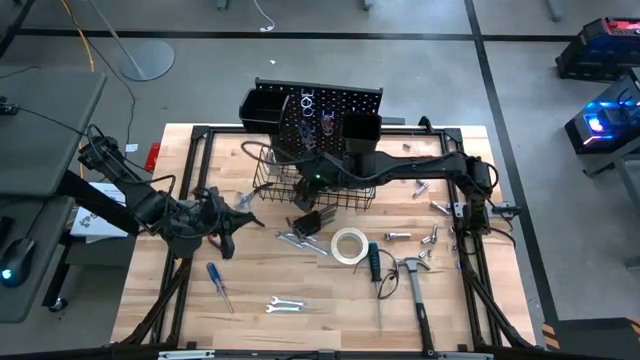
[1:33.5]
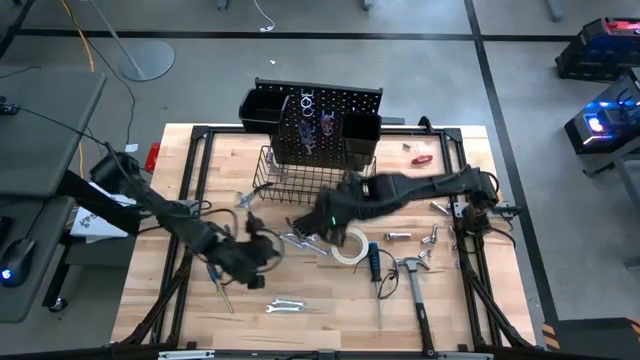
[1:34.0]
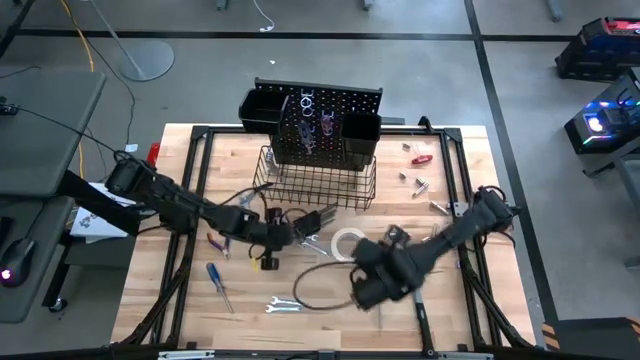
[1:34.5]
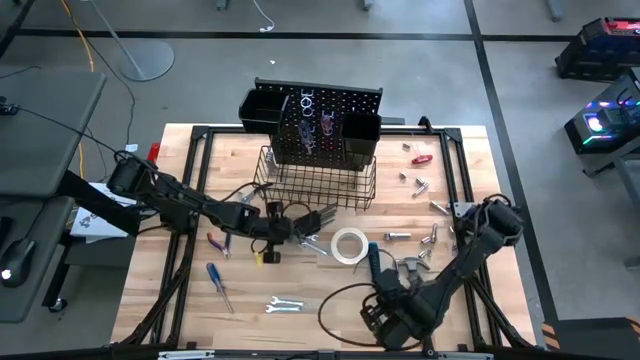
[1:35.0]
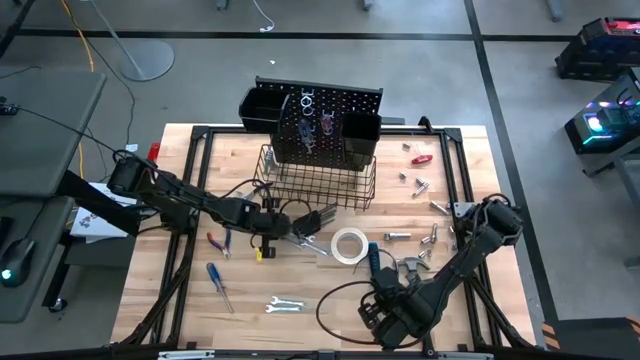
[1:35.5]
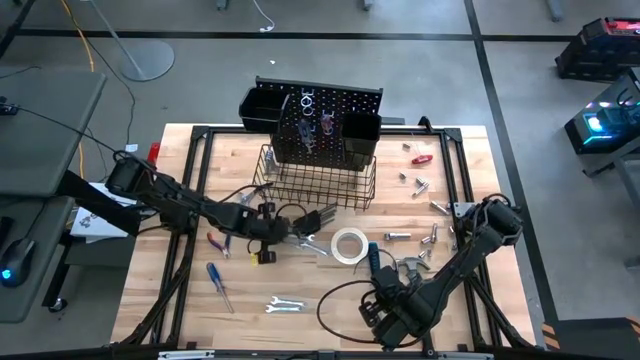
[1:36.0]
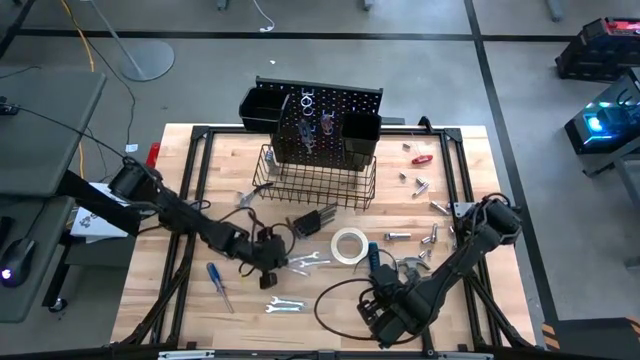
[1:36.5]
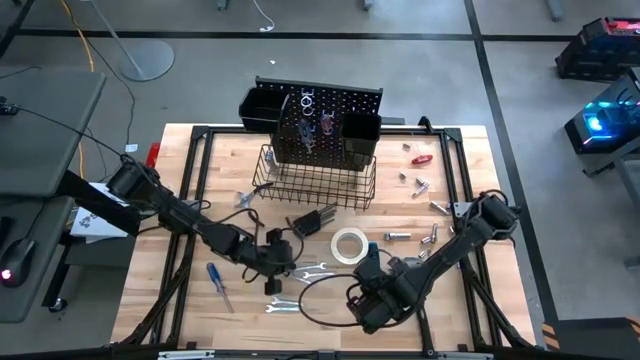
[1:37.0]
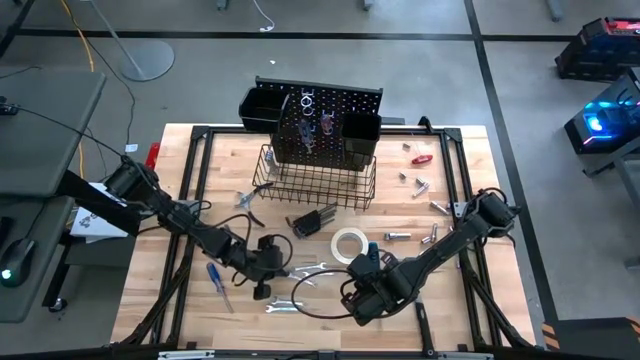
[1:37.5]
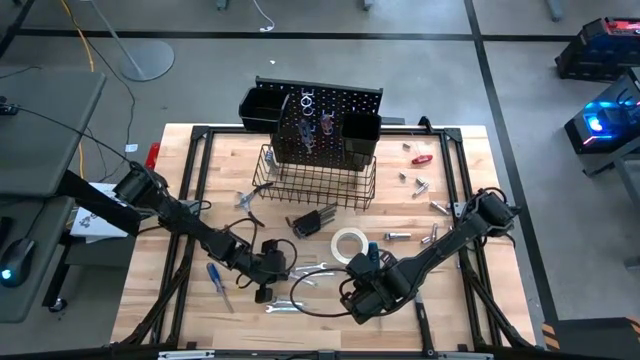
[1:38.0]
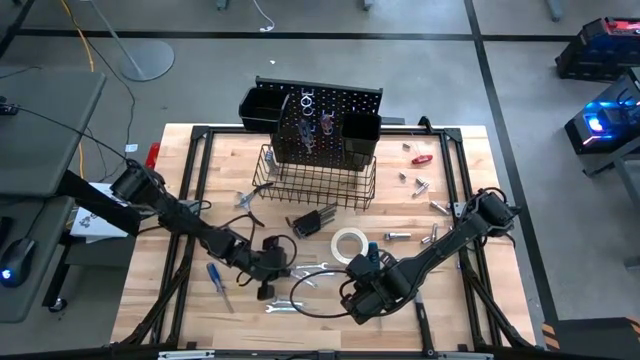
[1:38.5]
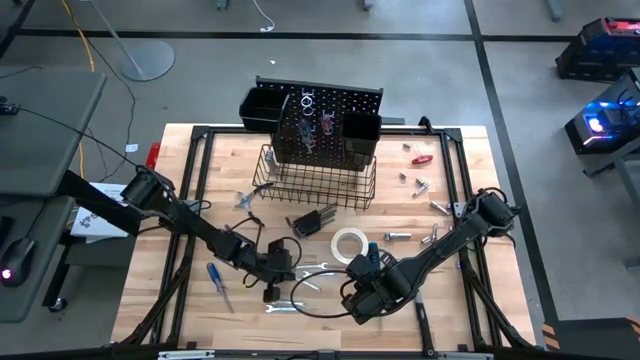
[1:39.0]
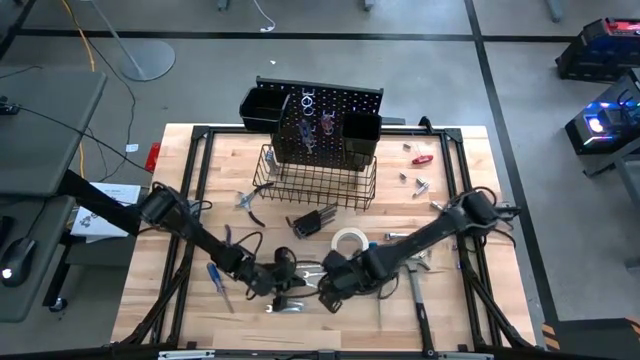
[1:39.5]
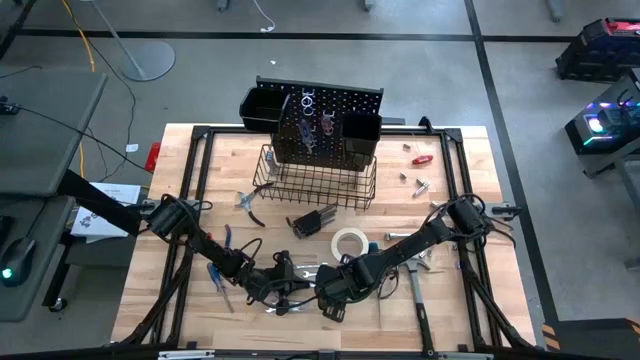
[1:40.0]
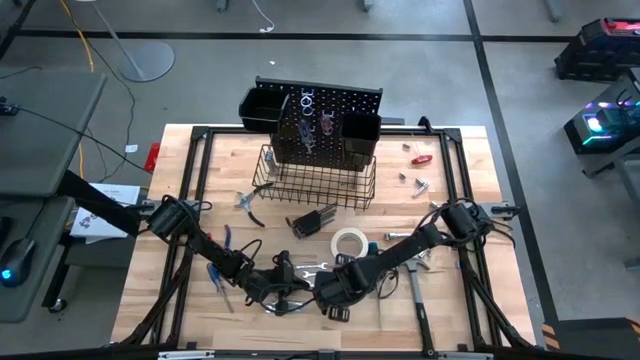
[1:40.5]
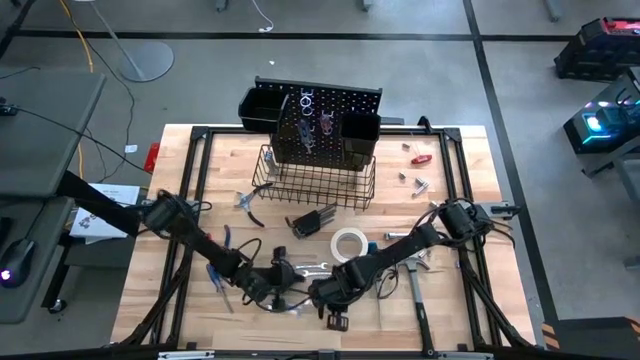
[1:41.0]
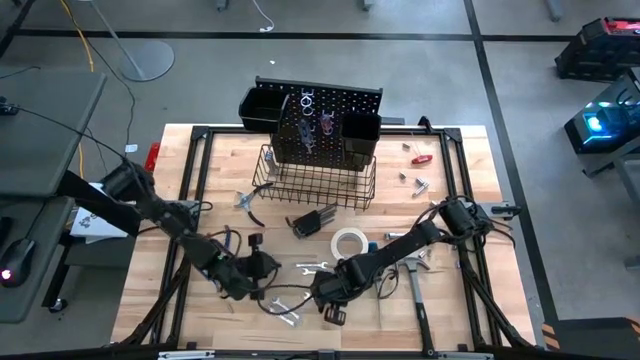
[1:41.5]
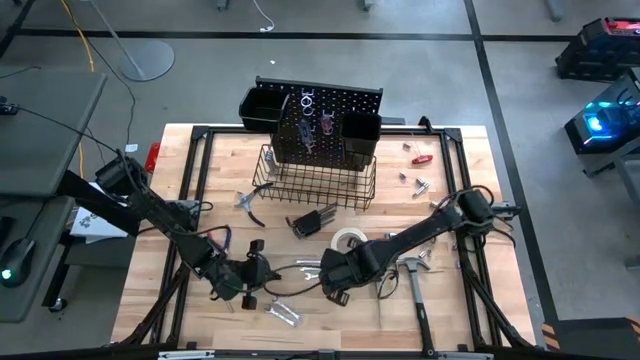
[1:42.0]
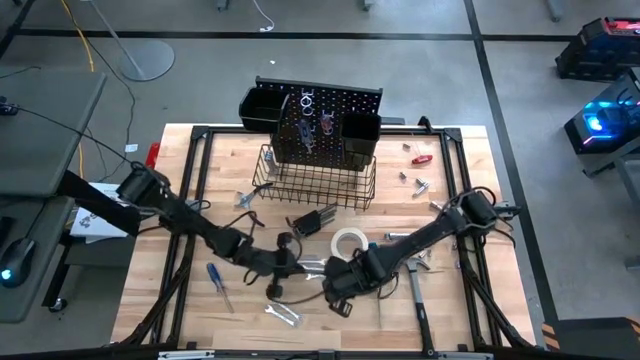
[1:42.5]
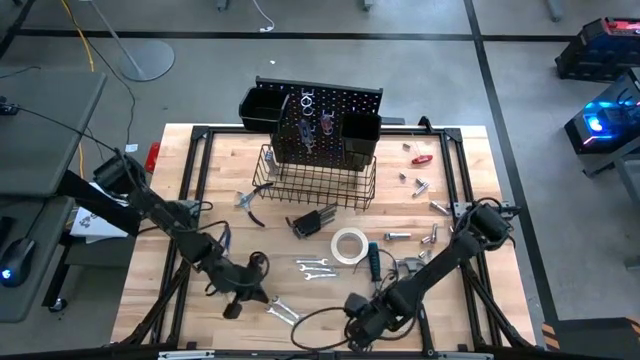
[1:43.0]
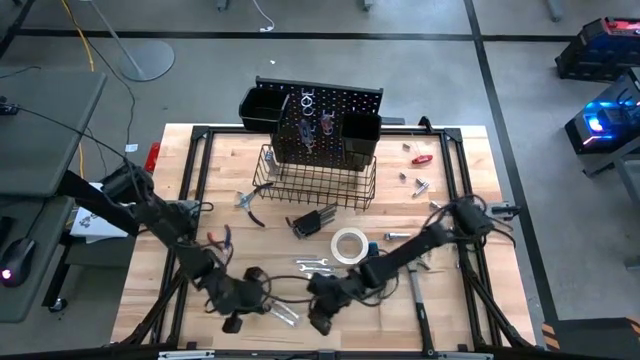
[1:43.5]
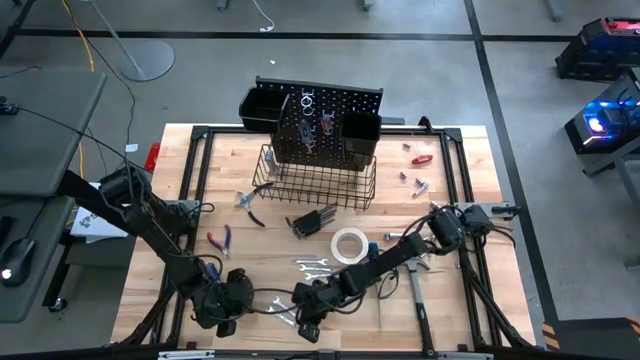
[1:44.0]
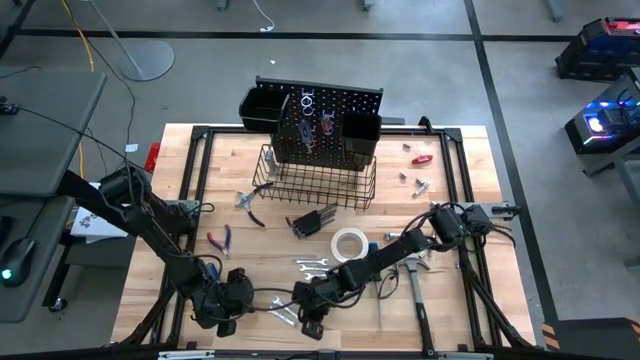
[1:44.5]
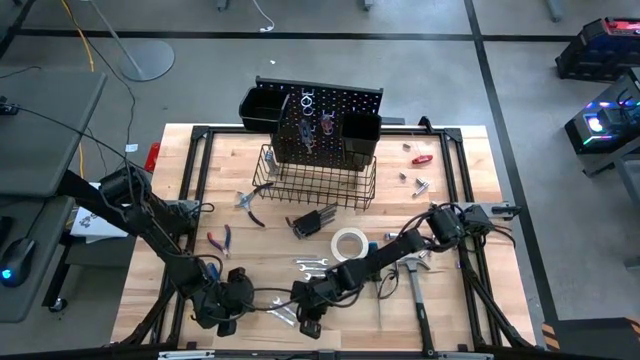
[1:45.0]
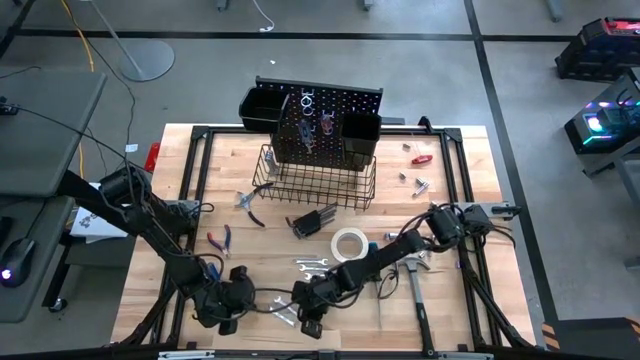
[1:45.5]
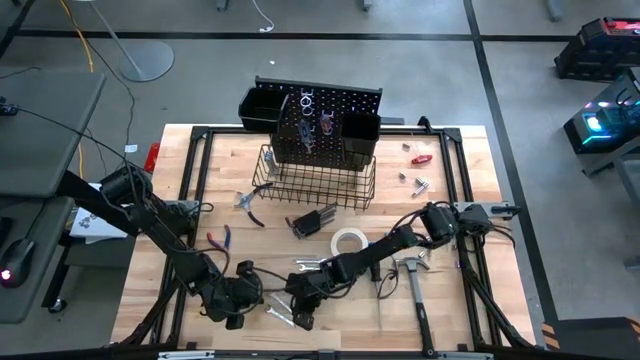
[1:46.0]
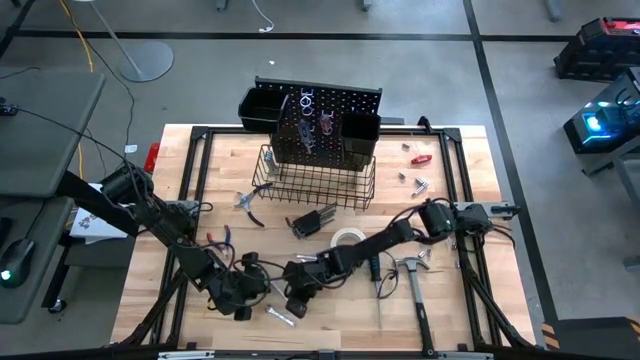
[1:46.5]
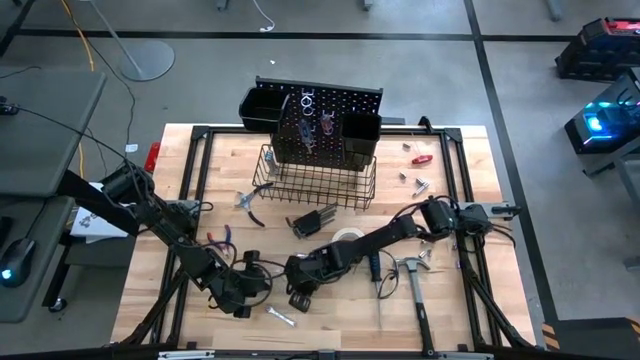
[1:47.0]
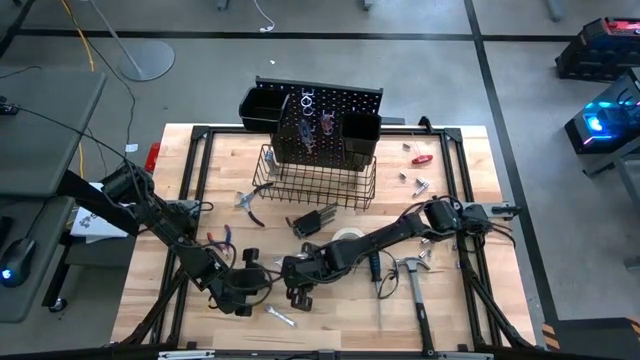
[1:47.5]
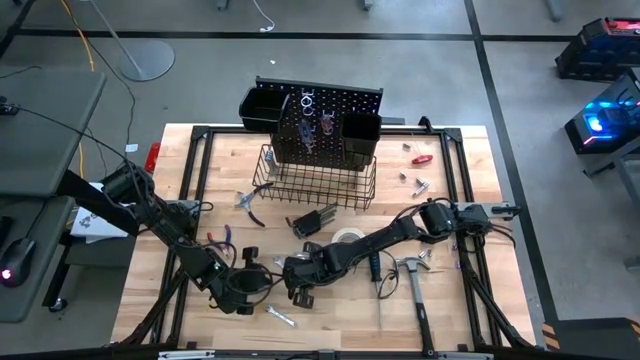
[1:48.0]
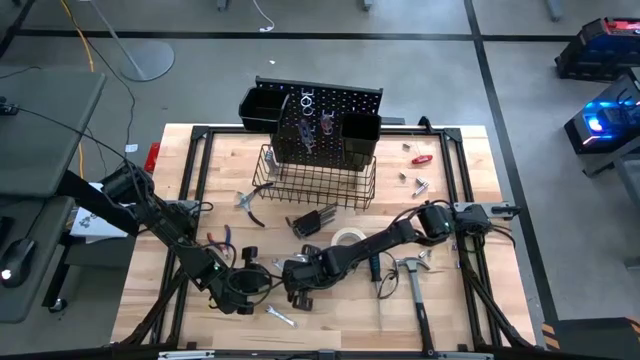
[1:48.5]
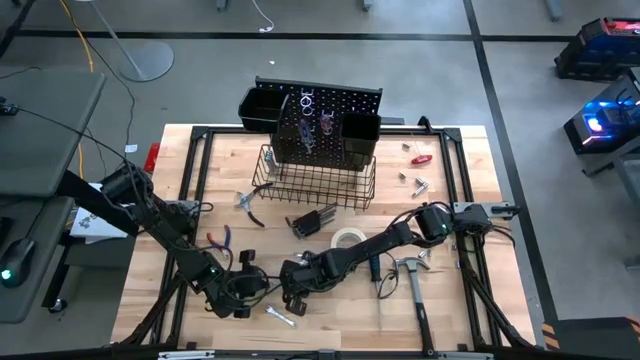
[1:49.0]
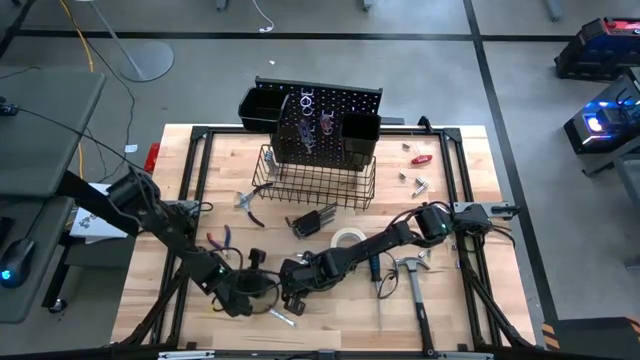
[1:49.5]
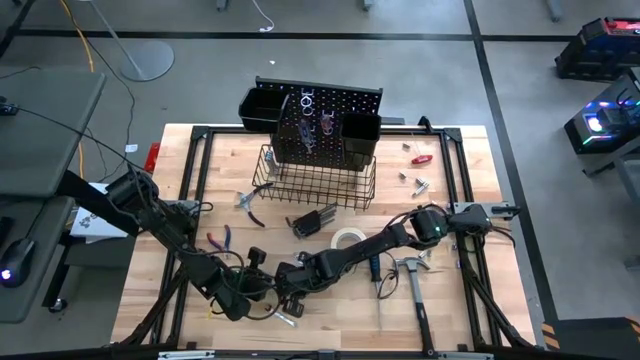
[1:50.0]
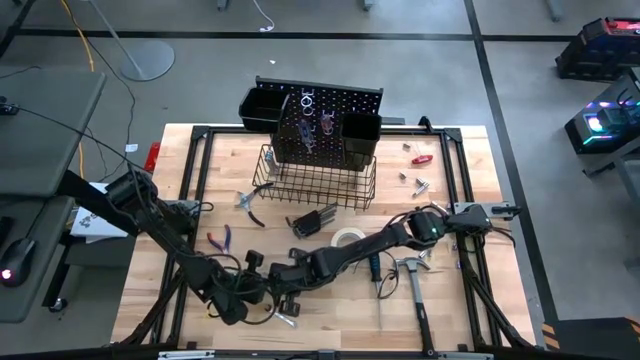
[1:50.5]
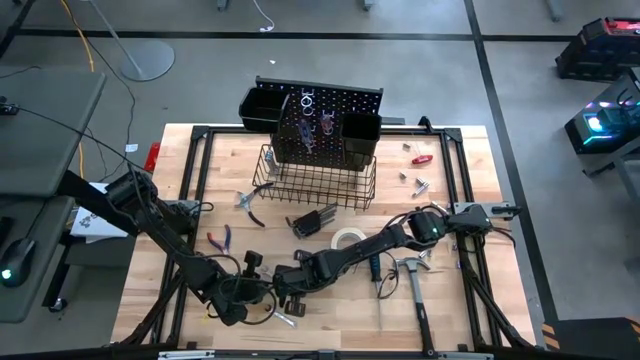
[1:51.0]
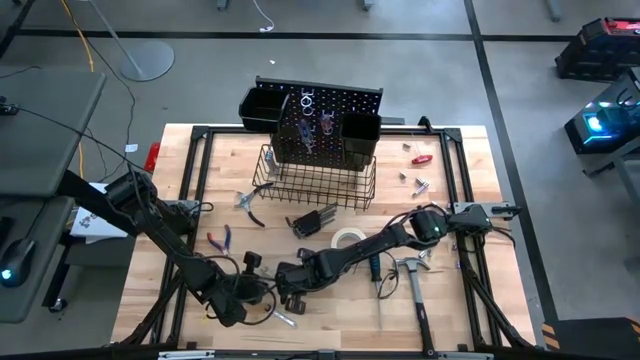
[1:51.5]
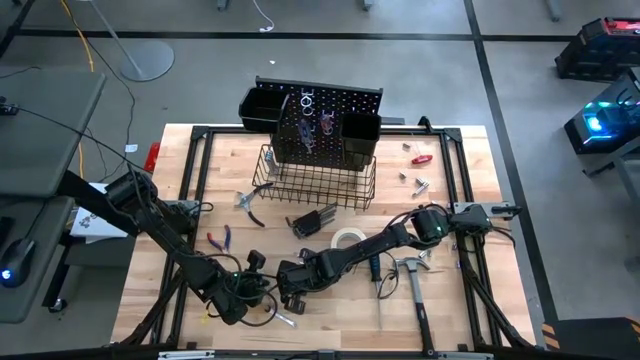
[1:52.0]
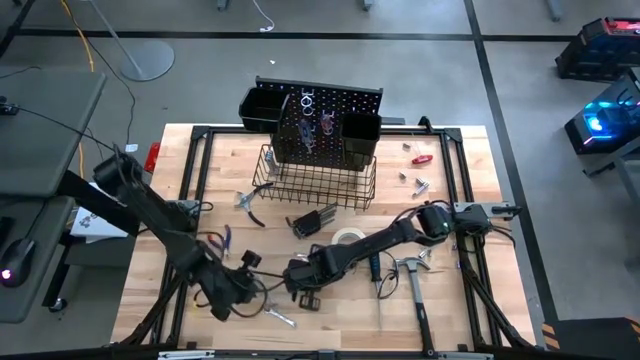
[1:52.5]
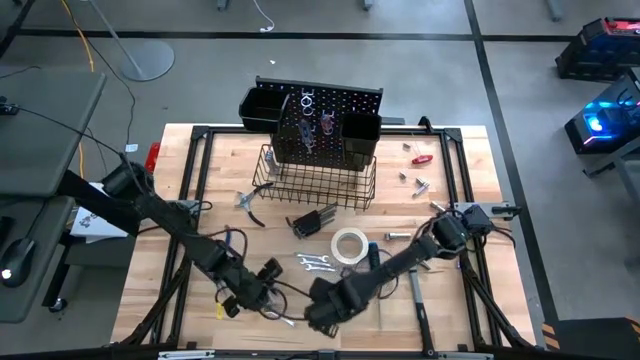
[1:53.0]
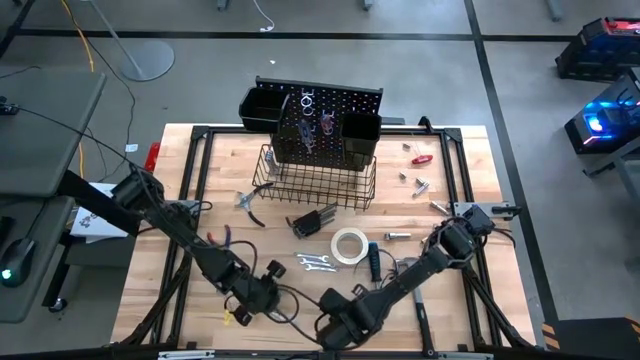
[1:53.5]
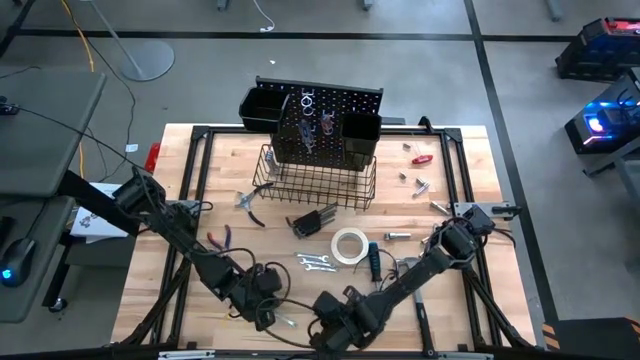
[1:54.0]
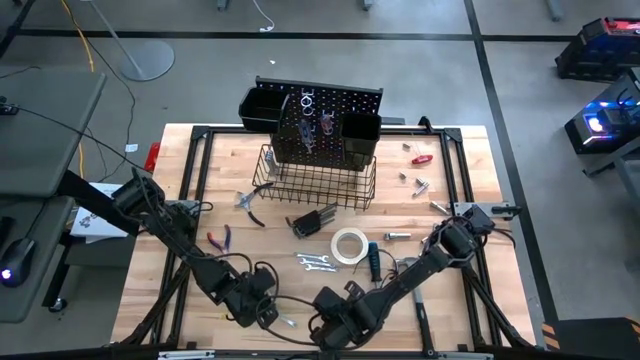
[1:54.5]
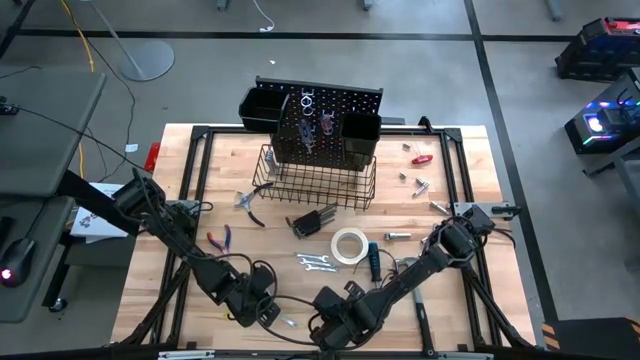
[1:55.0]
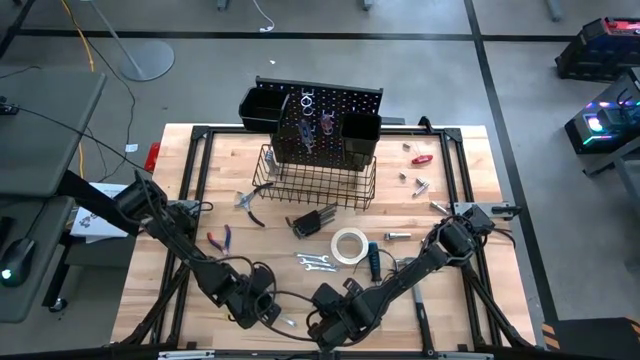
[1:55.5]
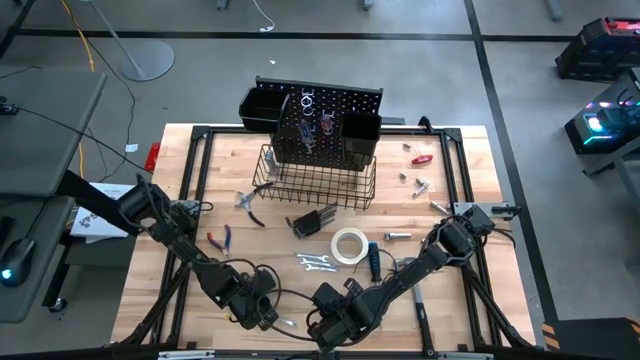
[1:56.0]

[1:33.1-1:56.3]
Task: Hang tools onto peg board
Hang the wrench on the peg board
